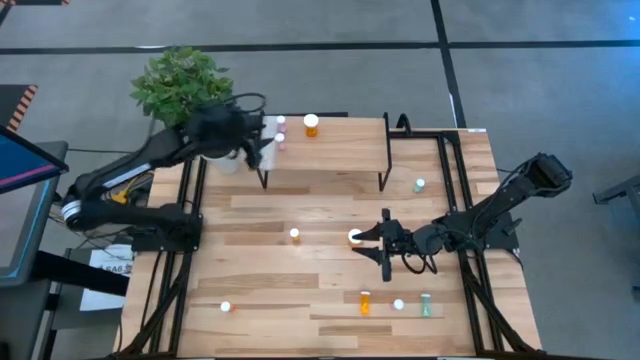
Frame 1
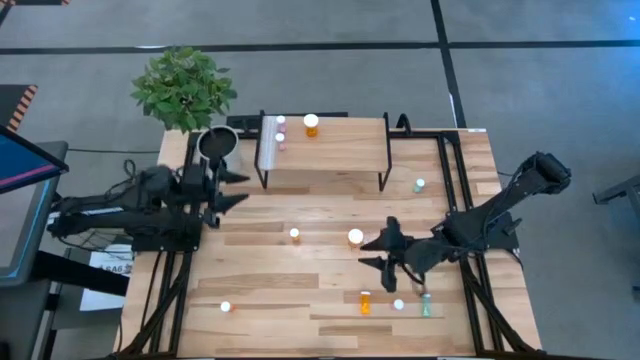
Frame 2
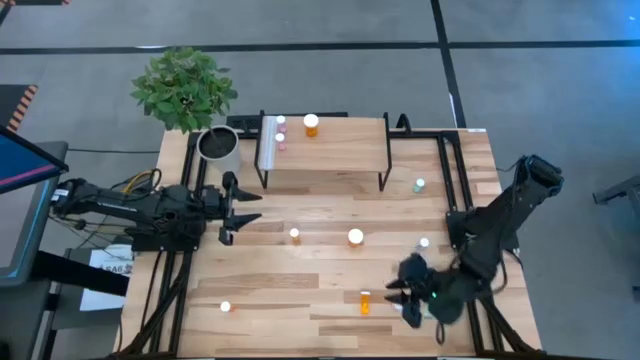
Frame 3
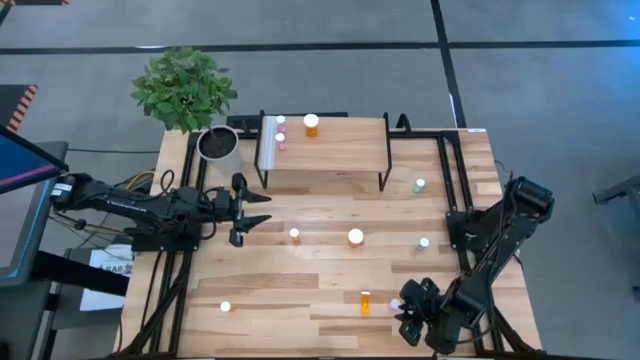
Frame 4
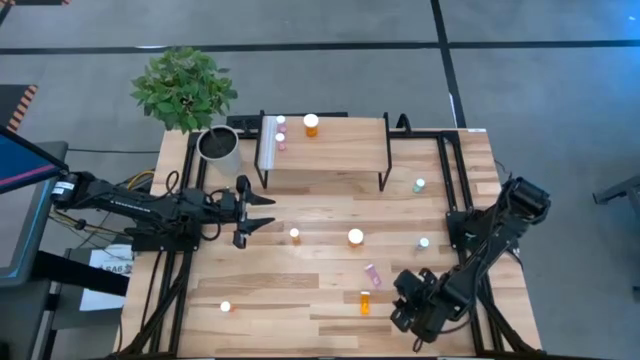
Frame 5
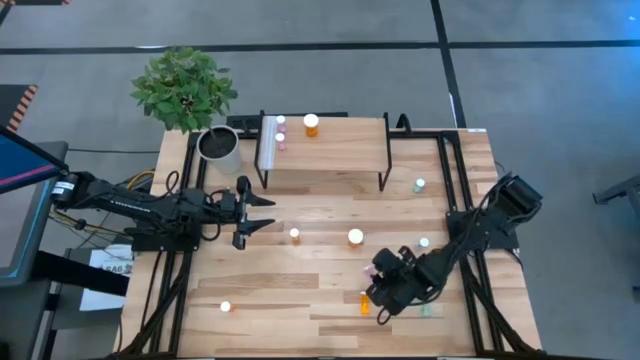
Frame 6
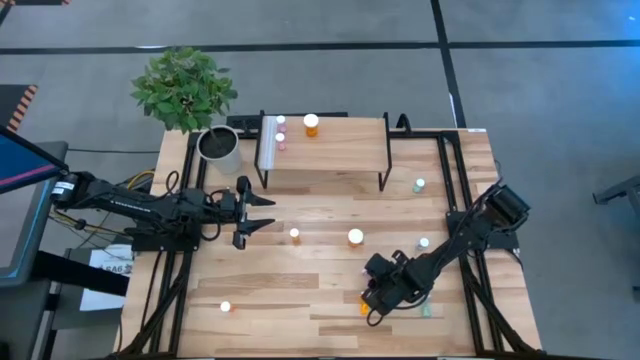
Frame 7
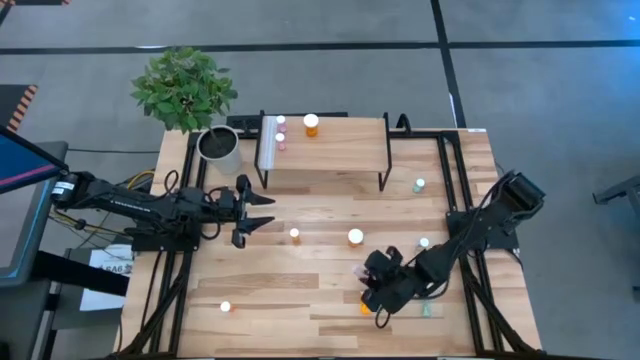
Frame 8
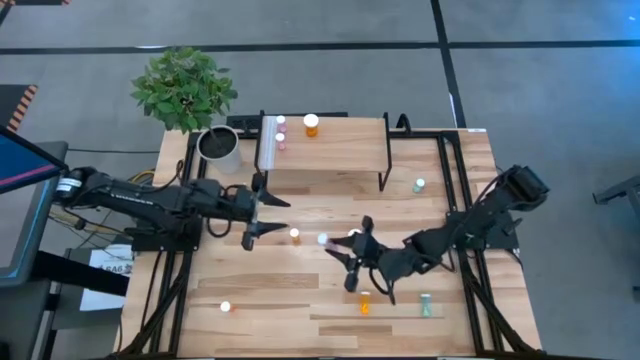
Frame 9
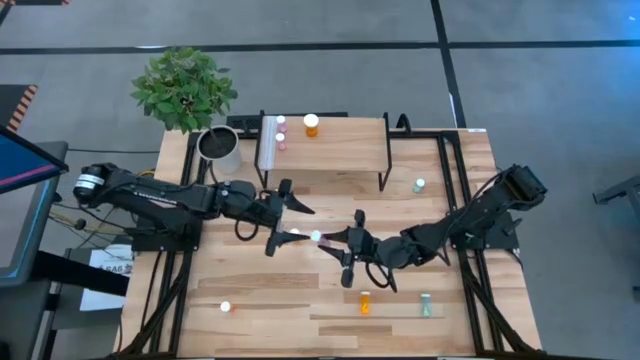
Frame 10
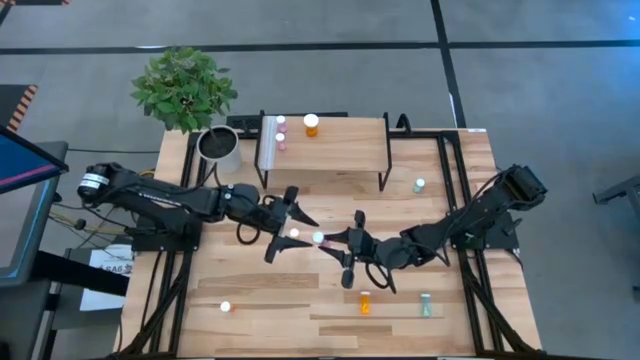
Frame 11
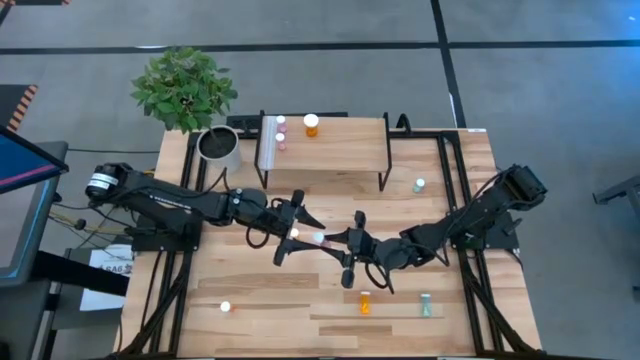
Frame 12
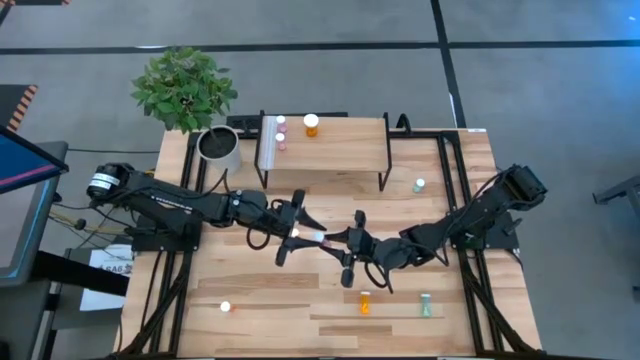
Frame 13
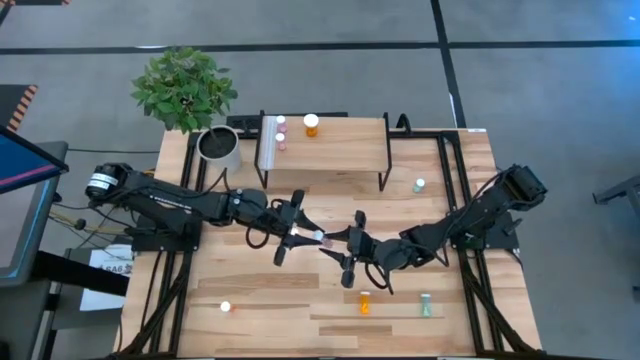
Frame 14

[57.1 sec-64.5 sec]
Task: Pick and place medicine bottles onto shelf by color
Put the pink pill bottle on the shelf aligned with the other pink bottle

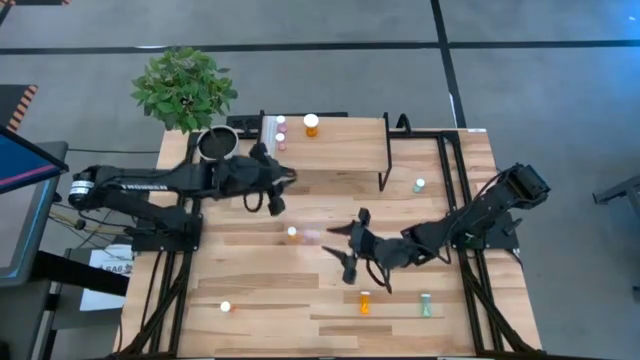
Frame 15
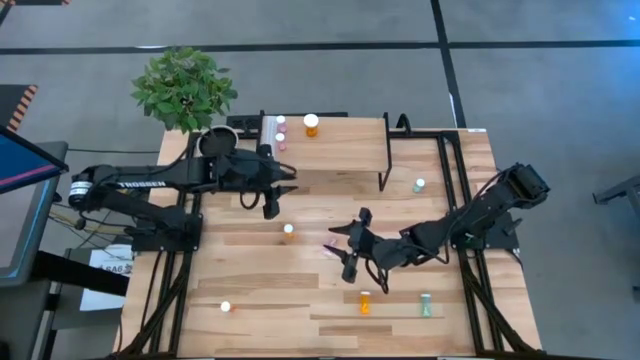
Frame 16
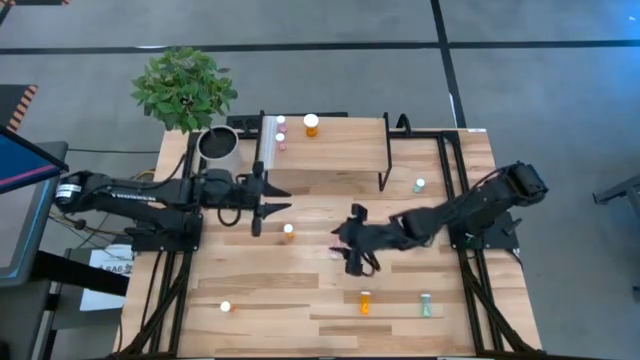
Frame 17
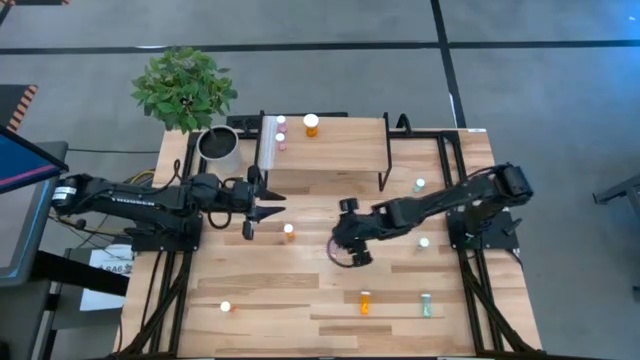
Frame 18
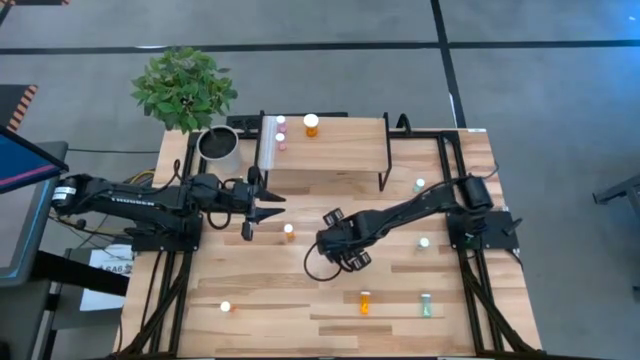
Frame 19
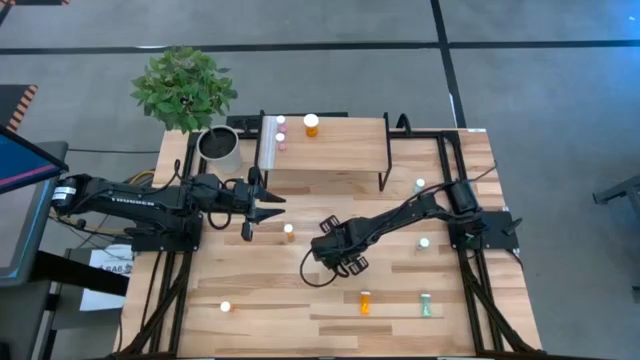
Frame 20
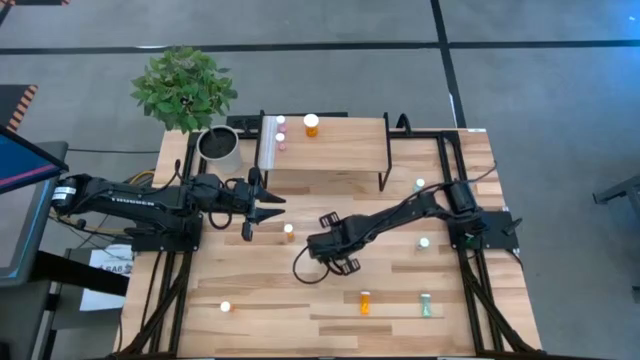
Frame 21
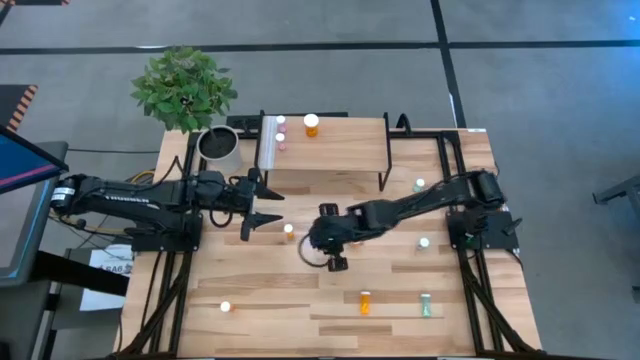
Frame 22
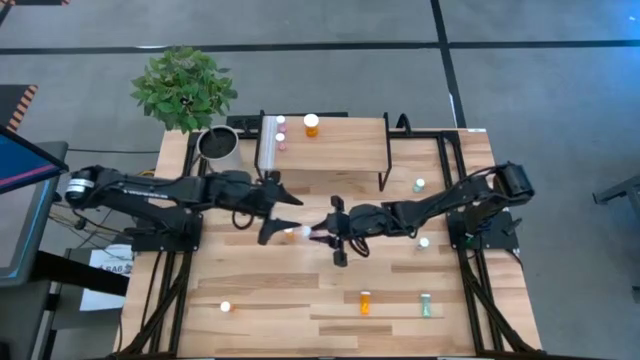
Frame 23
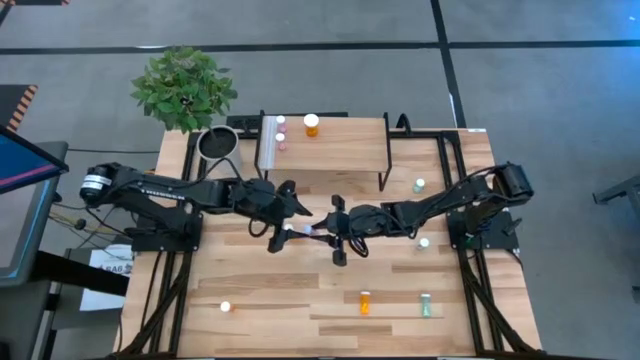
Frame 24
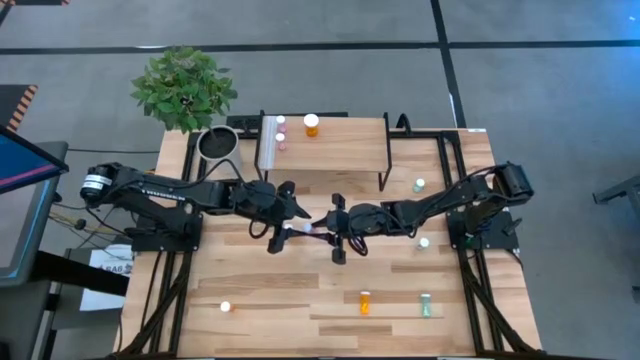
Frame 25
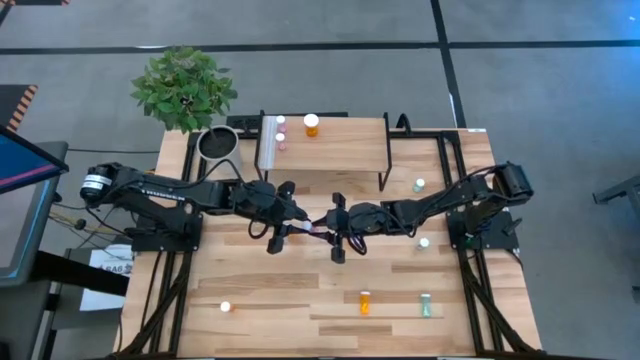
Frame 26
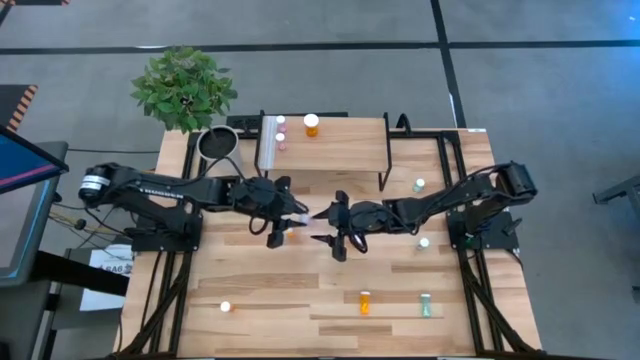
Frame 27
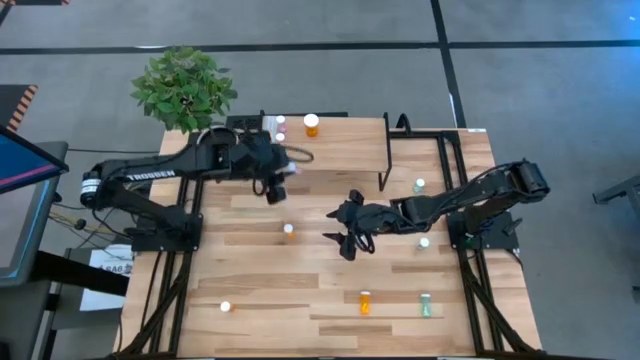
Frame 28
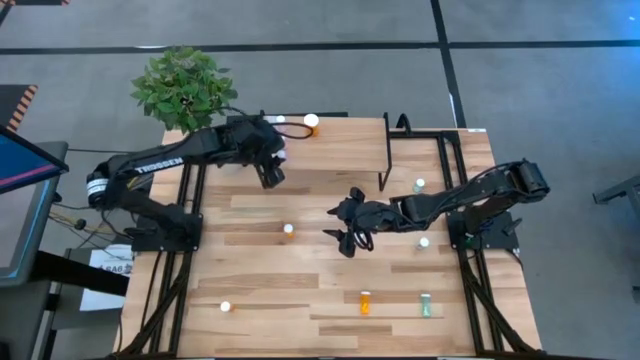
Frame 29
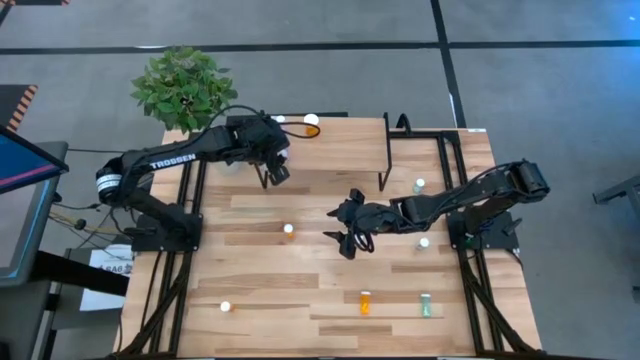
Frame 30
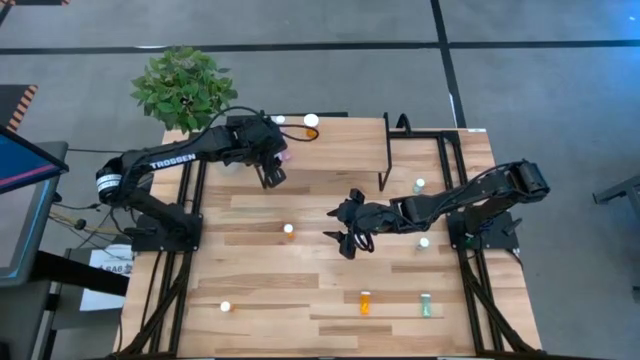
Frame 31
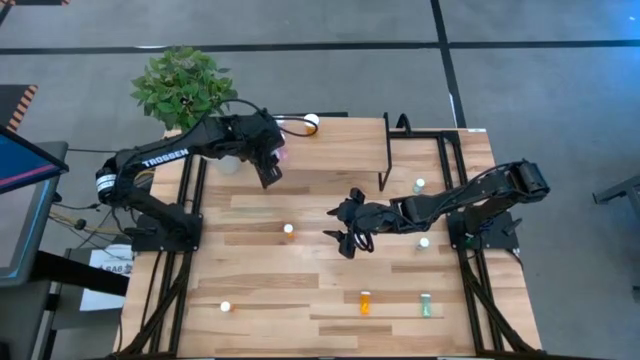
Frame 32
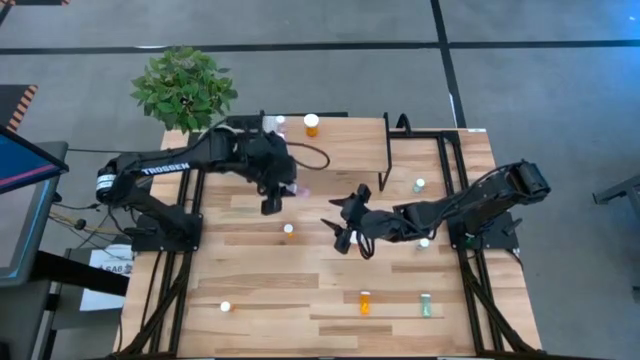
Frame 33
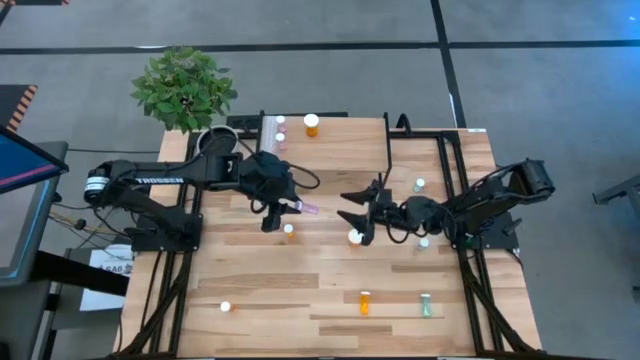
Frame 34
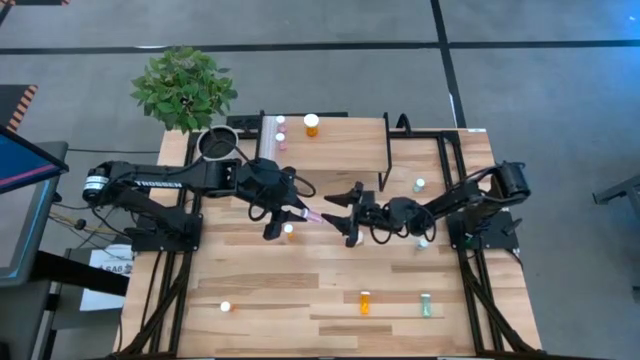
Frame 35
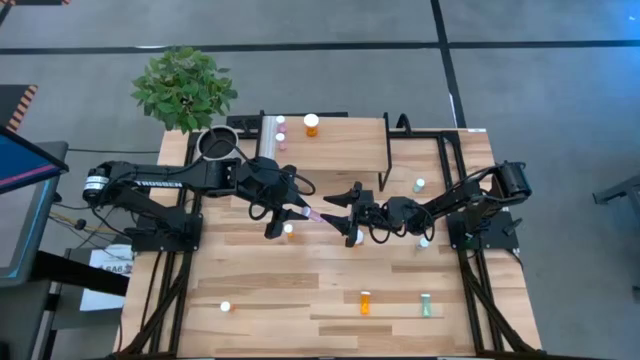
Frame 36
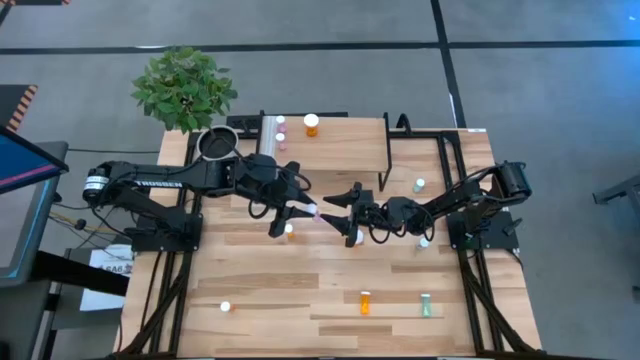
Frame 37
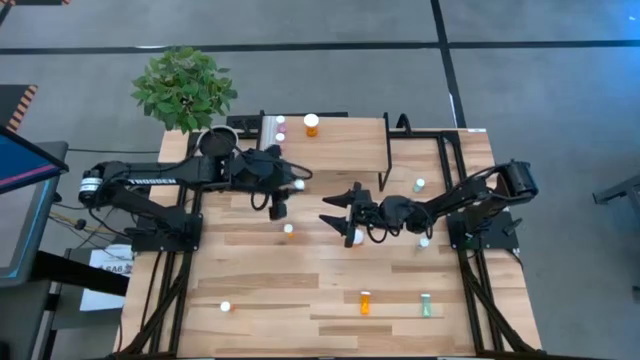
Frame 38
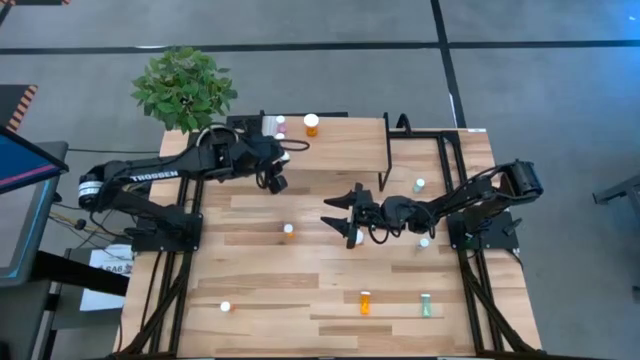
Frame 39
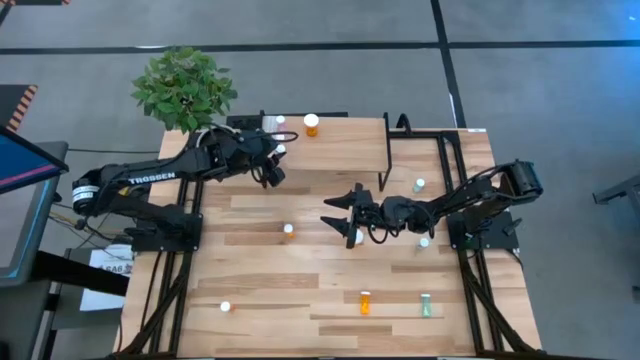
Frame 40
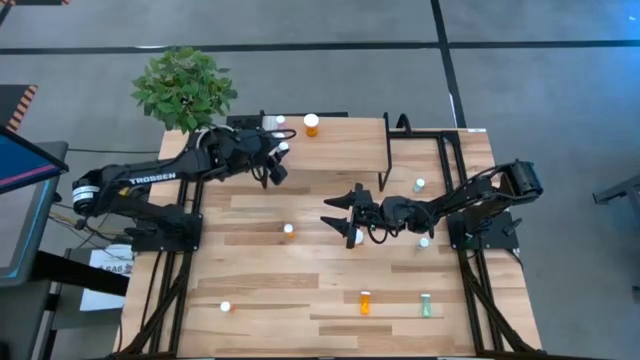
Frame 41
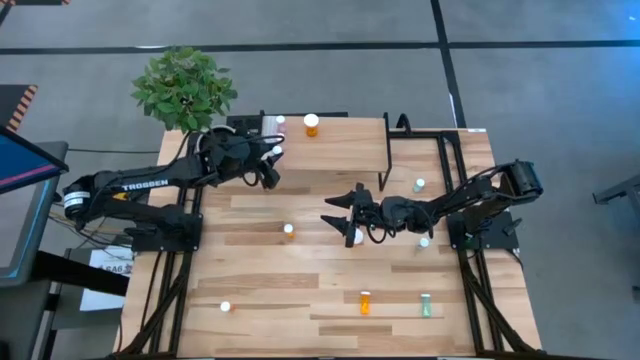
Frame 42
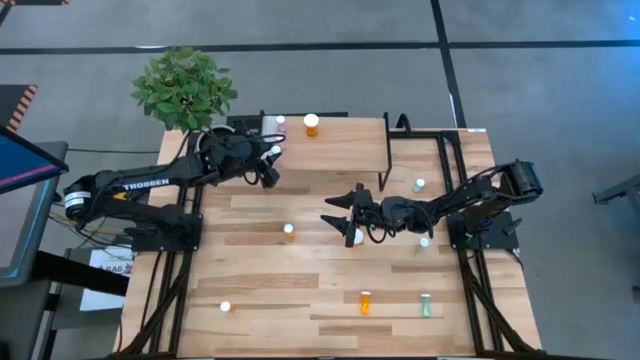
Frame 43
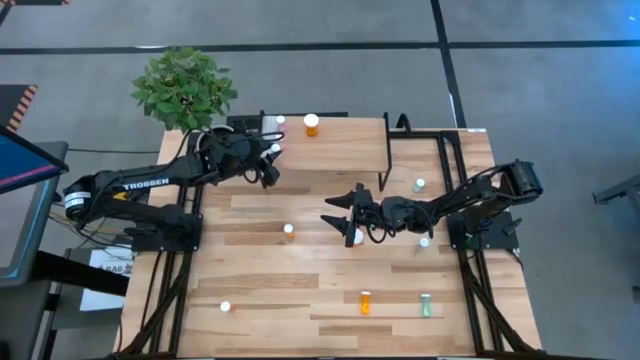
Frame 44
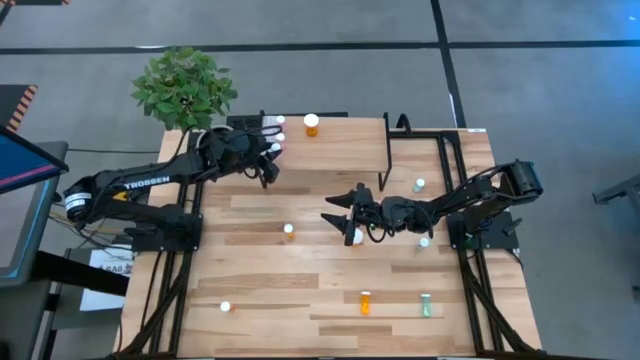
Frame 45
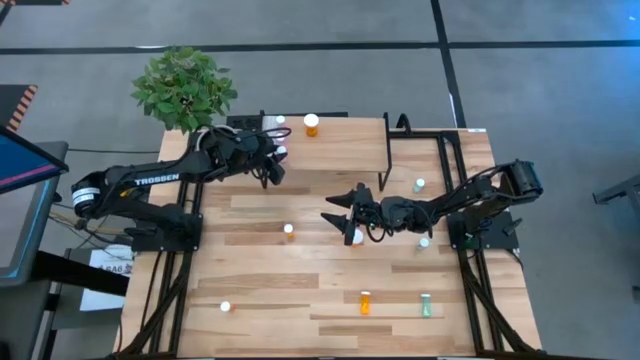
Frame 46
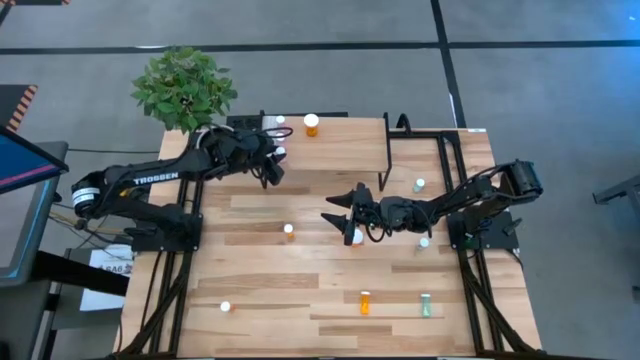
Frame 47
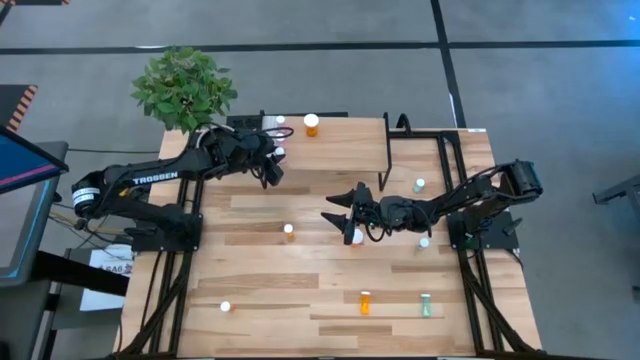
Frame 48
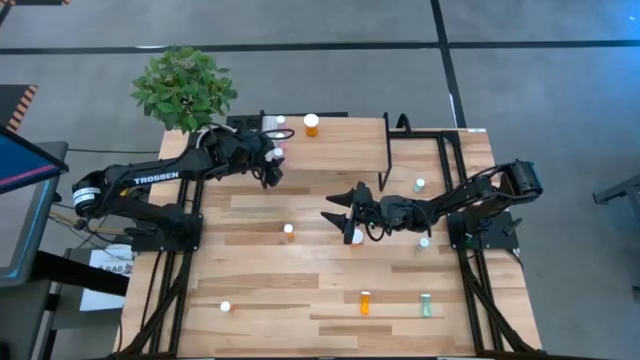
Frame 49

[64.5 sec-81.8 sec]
Put the pink pill bottle on the shelf aligned with the other pink bottle
